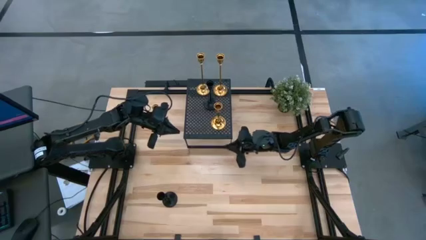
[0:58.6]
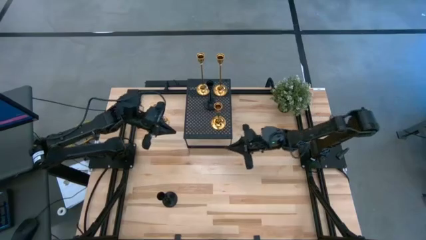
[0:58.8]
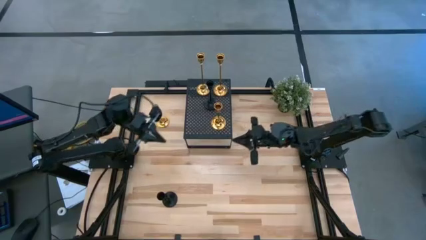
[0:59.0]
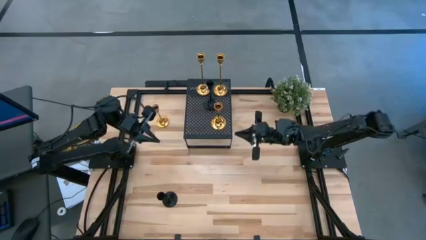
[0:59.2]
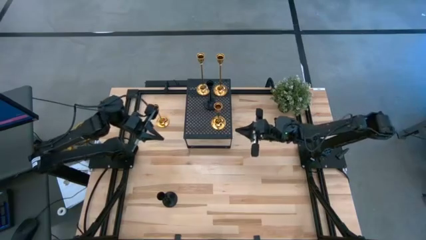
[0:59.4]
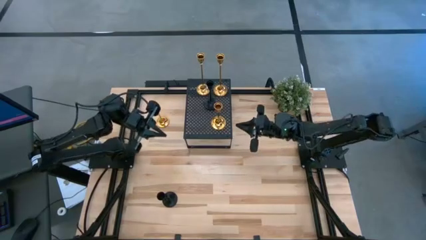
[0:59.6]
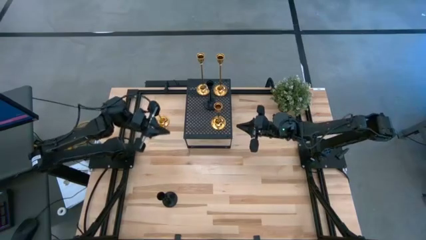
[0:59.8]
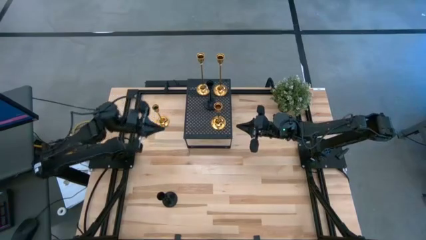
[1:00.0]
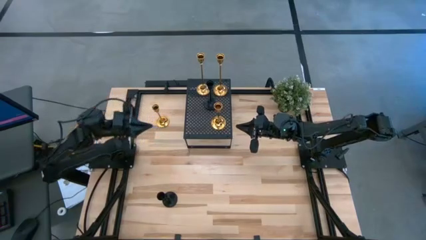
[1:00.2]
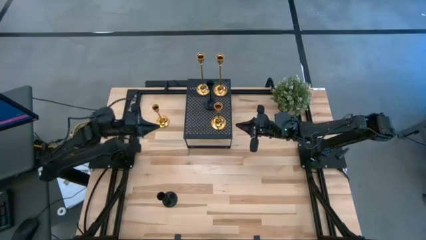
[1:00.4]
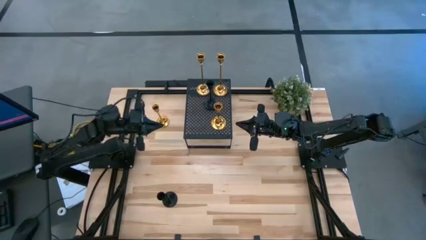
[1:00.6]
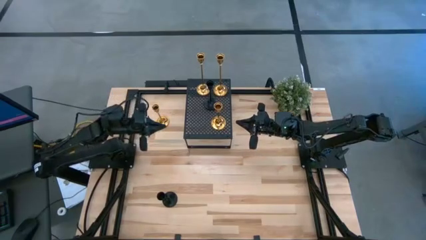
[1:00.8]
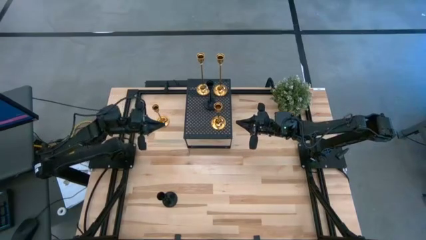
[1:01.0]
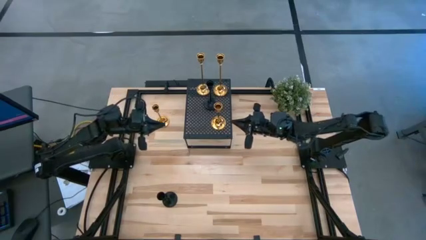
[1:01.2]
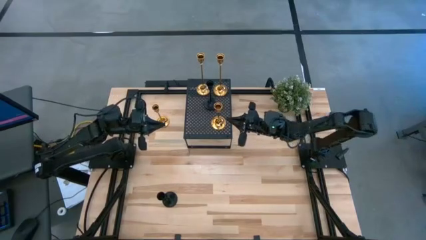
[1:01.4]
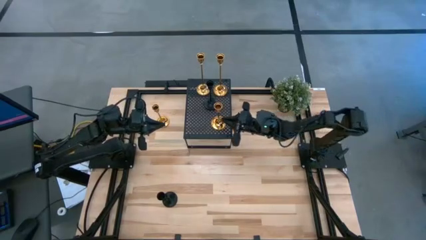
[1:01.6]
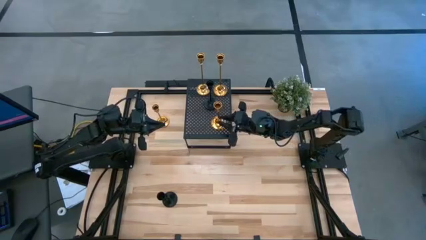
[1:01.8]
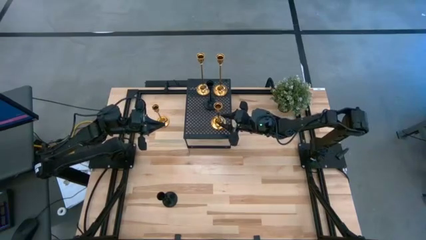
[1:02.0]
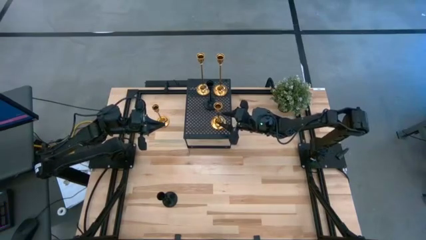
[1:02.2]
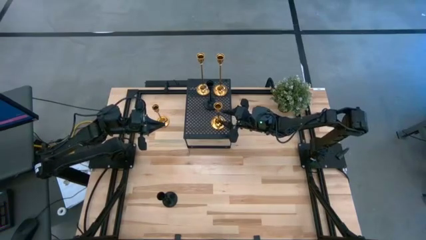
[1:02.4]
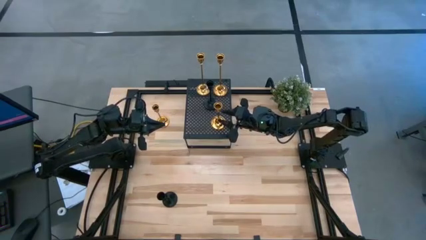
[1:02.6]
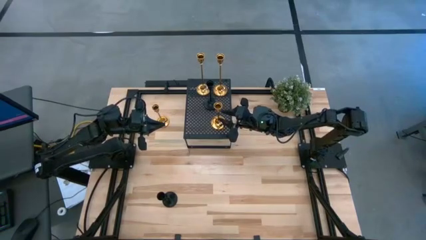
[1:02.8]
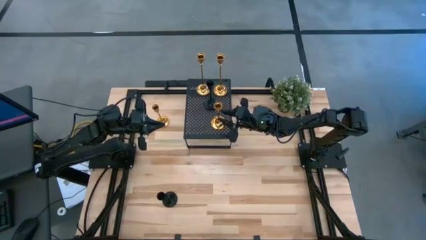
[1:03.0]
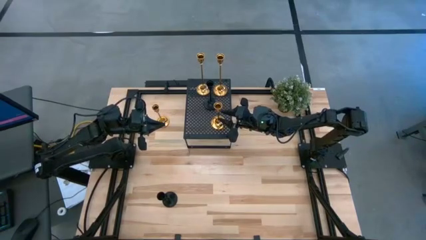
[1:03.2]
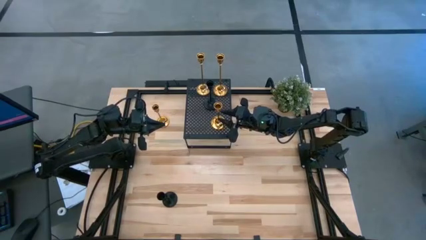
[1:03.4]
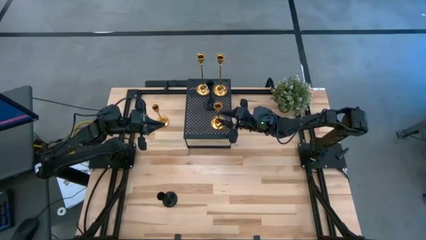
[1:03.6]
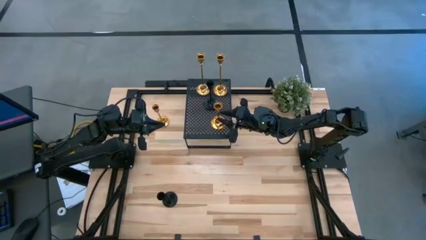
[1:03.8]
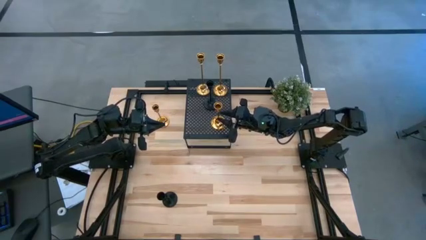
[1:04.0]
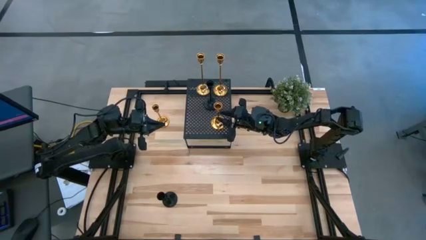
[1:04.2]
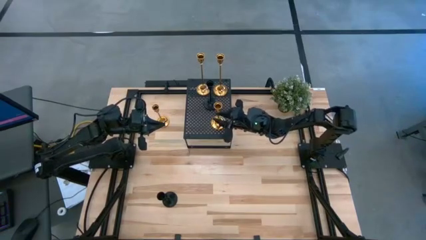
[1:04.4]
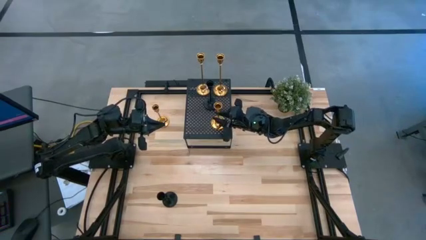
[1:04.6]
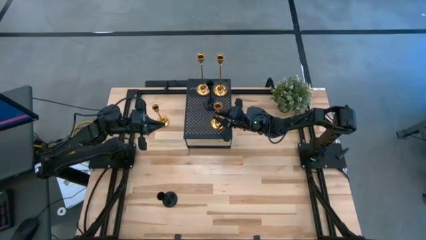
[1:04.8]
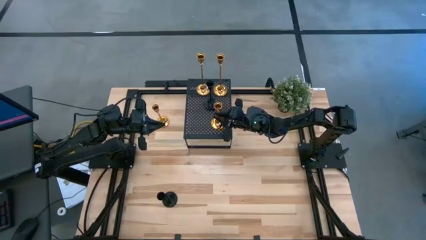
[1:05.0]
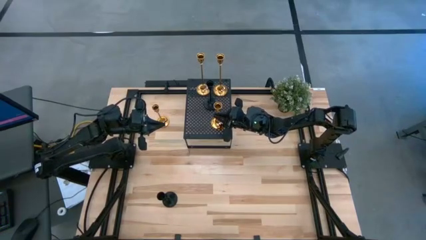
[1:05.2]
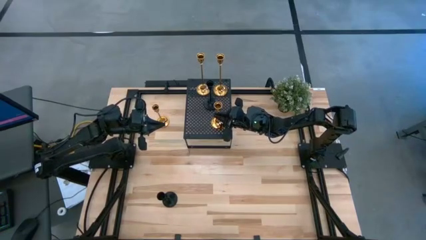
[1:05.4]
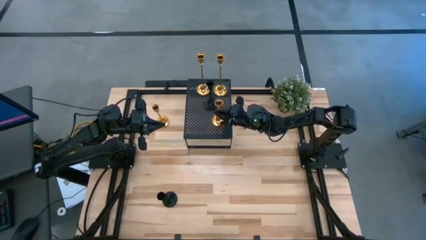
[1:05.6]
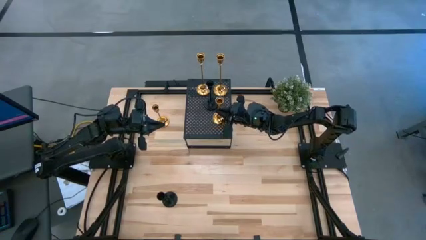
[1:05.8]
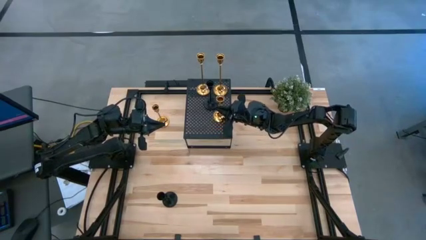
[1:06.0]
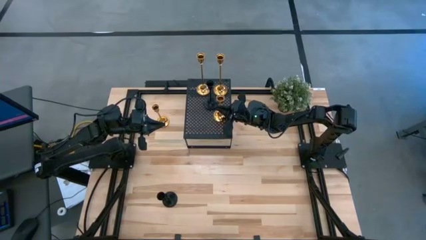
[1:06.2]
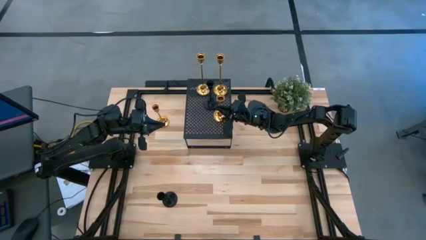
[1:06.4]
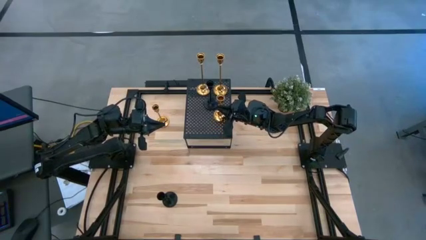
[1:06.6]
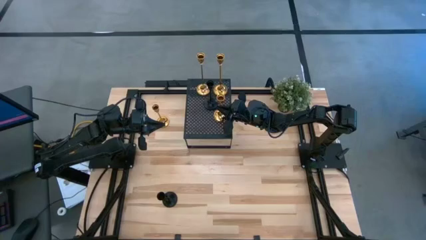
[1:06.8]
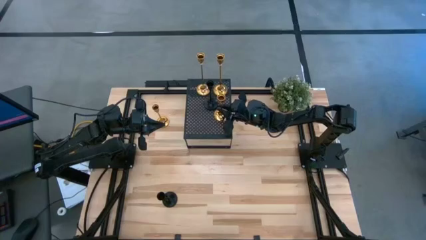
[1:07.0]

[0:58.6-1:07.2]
Task: Pick & Place candle stick holders
Adjust the small gold candle holder on the shelf

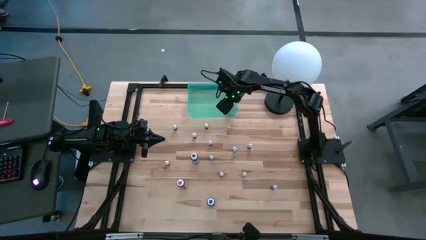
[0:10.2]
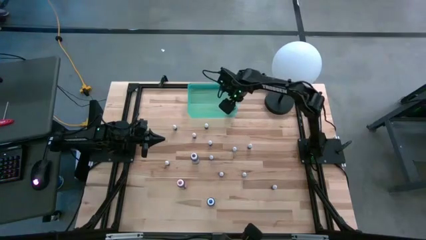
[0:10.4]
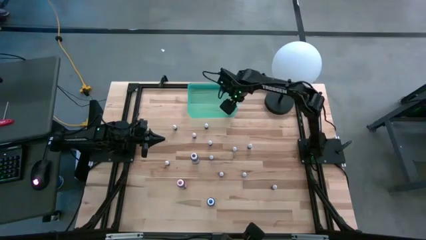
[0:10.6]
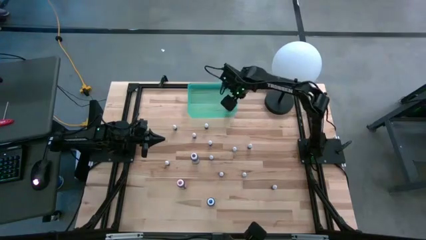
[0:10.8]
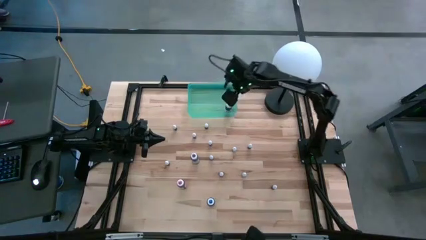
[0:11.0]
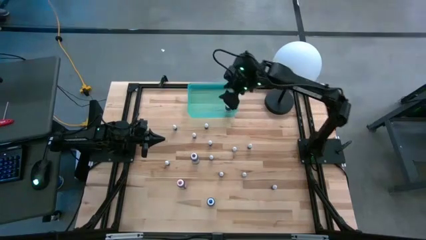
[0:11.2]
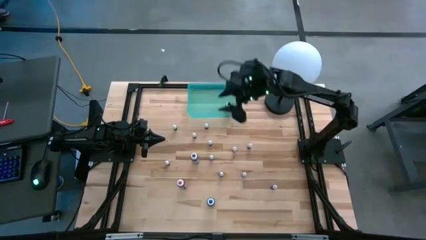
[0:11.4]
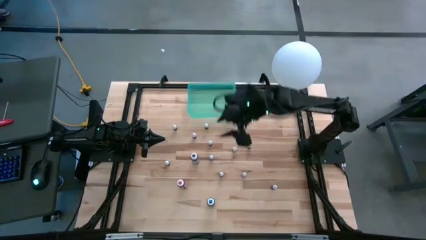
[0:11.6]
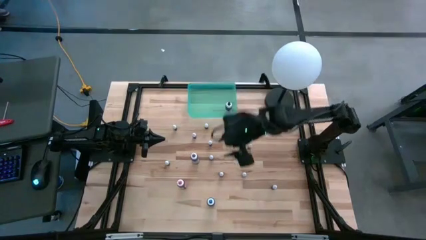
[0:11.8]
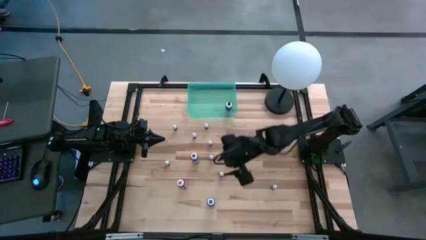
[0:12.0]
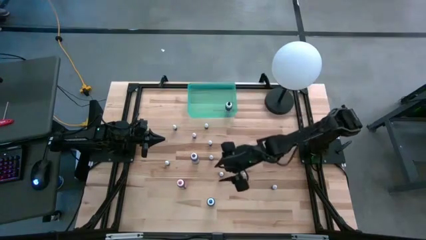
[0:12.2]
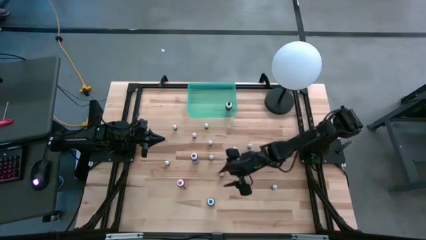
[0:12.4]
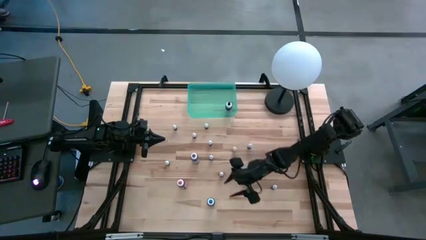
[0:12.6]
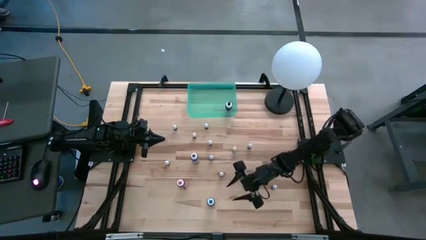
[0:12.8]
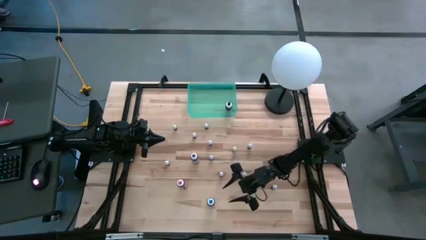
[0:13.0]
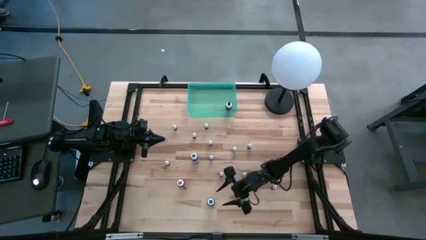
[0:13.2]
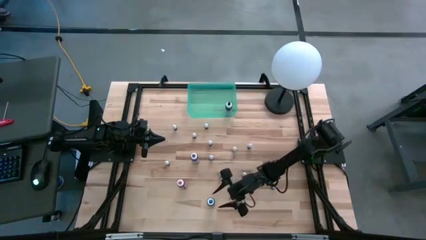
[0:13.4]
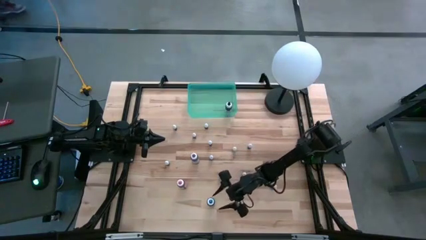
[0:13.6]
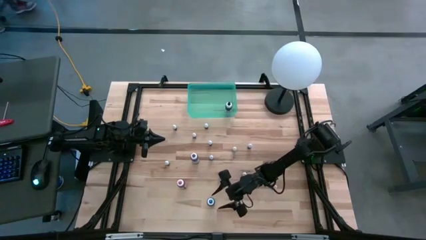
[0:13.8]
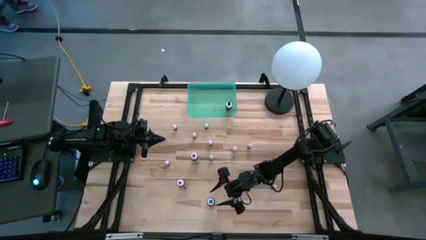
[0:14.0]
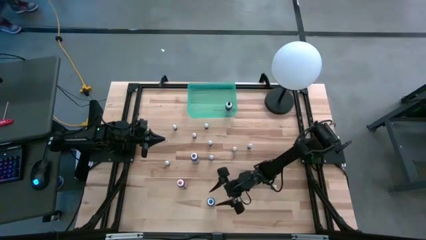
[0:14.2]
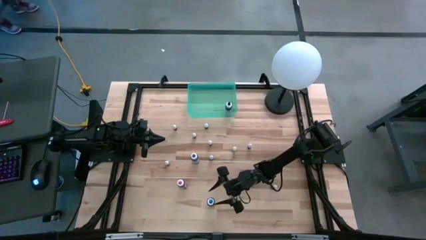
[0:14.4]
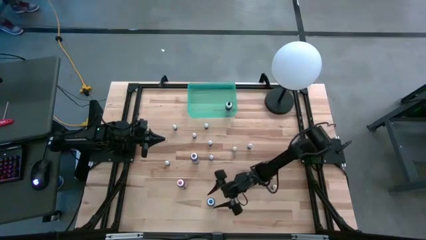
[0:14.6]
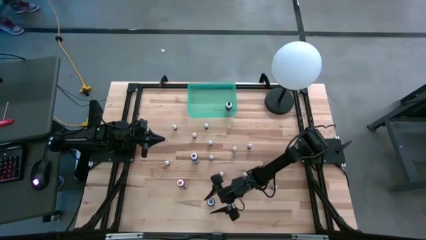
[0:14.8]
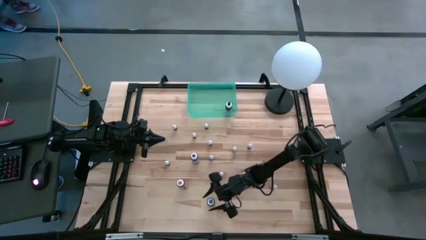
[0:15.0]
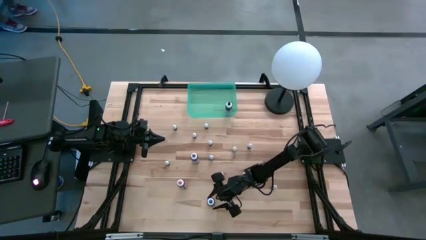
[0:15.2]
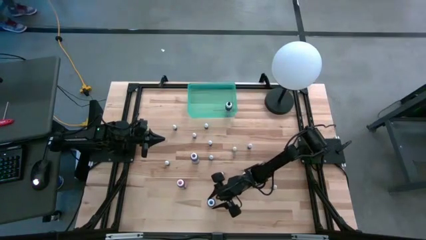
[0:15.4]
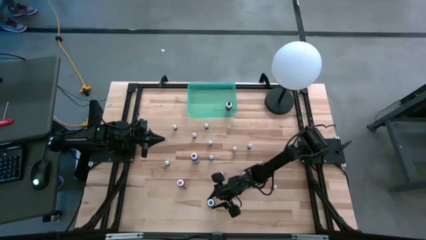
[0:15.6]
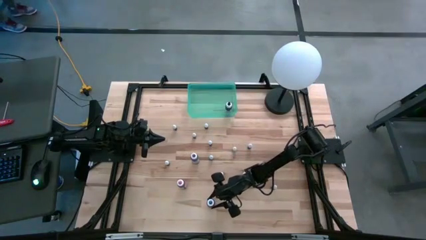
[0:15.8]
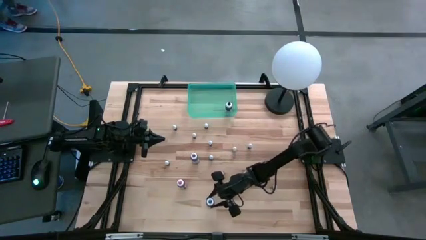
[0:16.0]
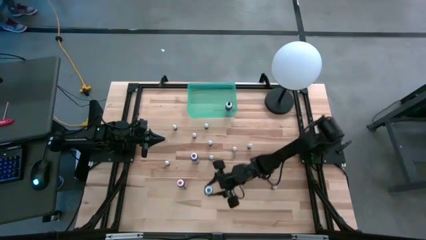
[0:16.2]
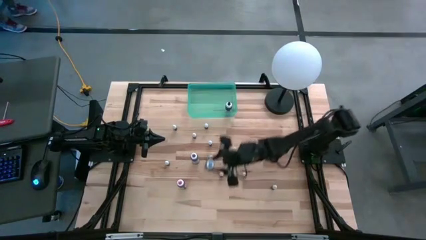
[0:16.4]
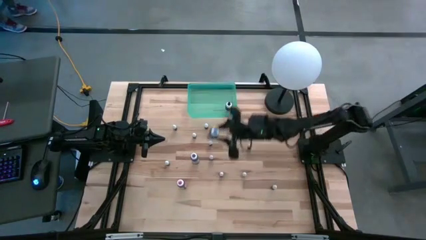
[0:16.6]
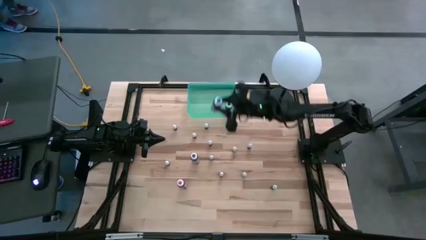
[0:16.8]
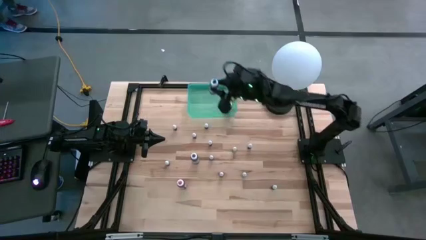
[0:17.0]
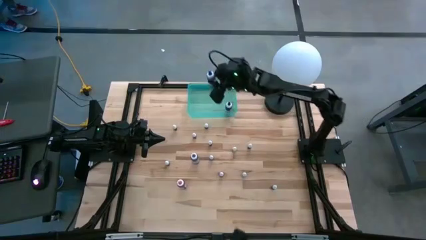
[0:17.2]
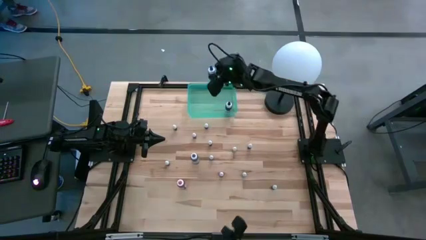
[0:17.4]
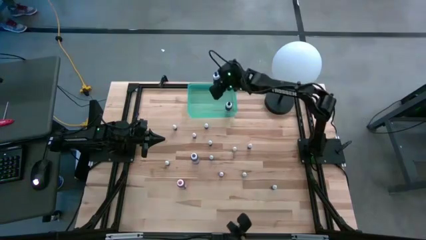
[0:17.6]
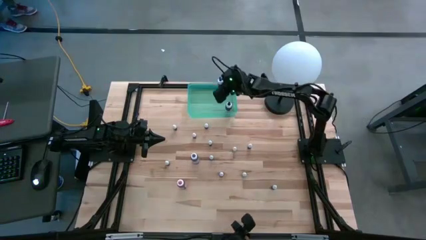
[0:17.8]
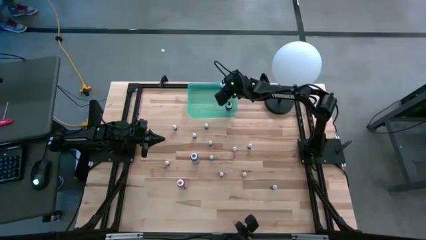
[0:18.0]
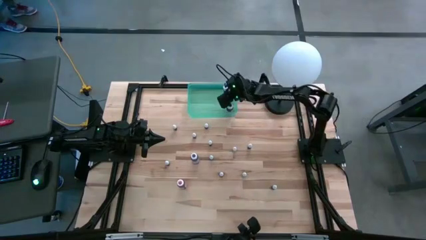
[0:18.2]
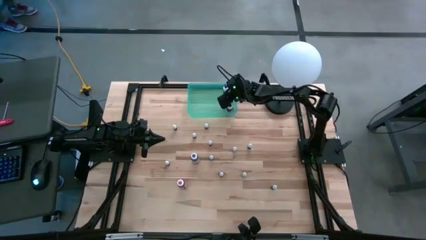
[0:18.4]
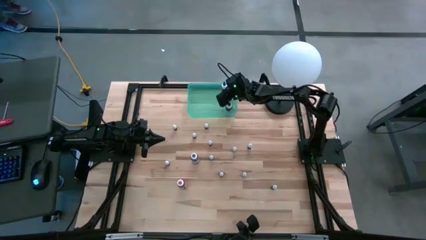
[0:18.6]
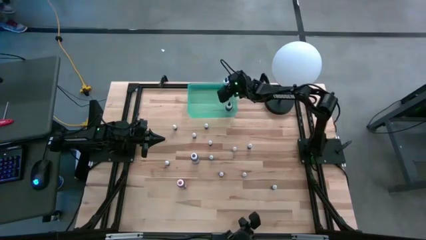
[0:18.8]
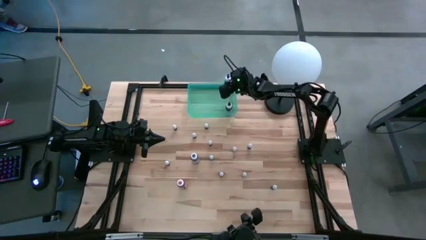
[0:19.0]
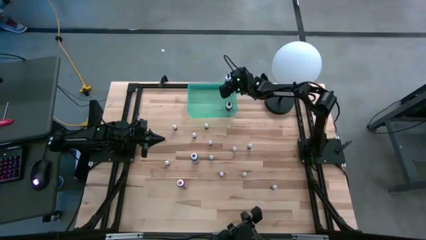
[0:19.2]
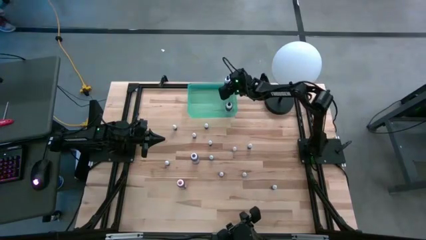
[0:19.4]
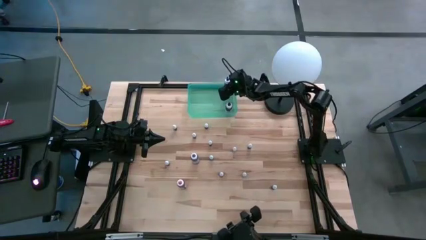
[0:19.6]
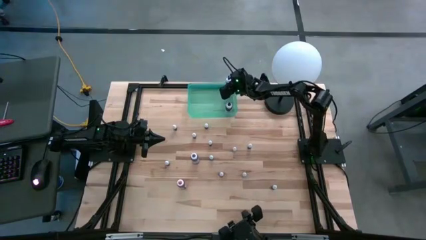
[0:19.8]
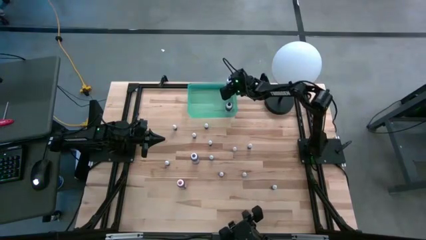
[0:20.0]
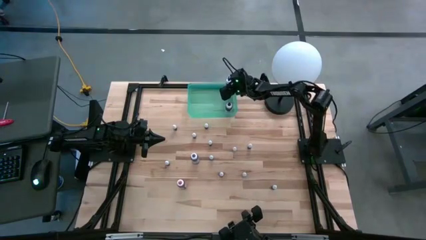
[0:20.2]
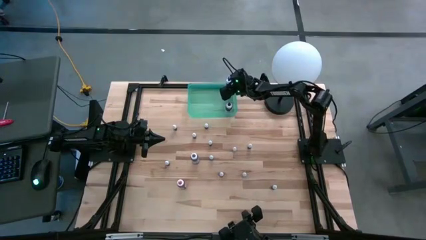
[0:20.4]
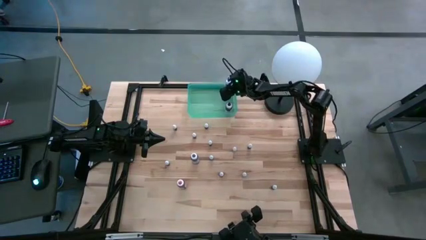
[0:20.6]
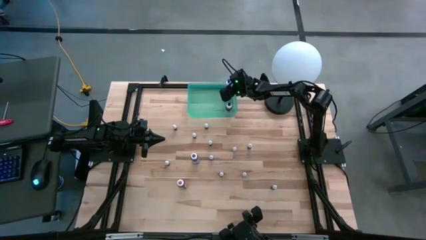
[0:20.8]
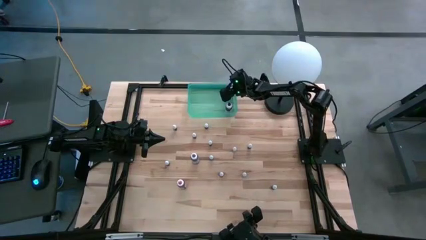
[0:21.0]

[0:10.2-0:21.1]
Task: Pick & Place food coloring
Put the large blue food coloring into the bin
